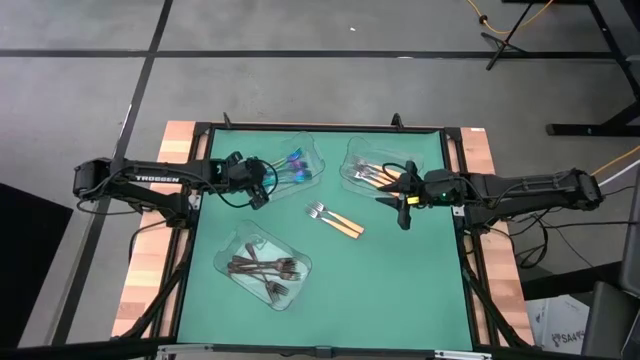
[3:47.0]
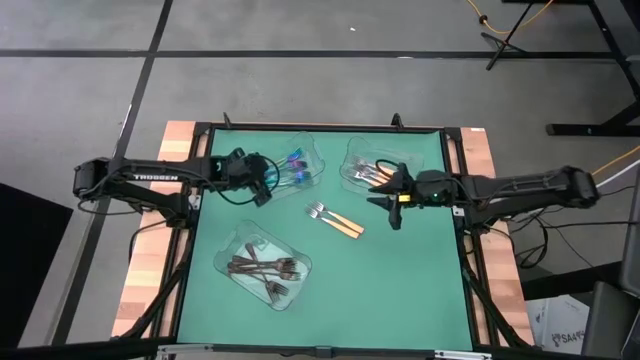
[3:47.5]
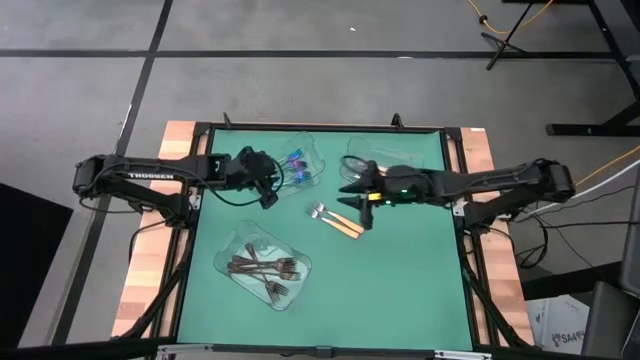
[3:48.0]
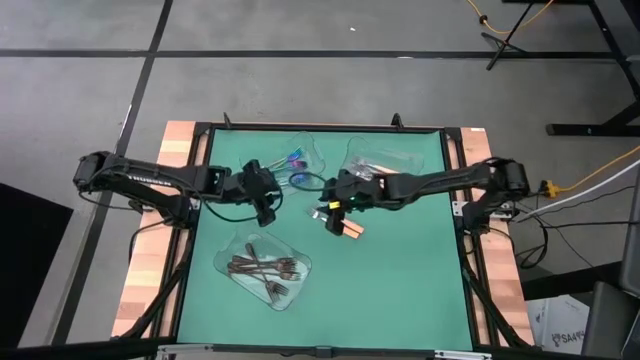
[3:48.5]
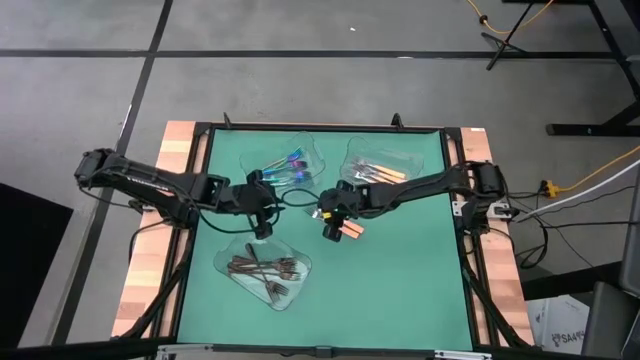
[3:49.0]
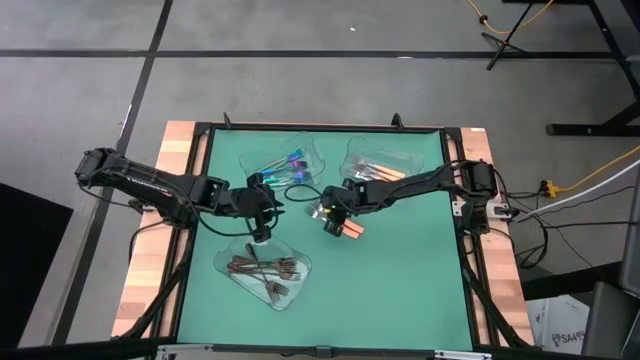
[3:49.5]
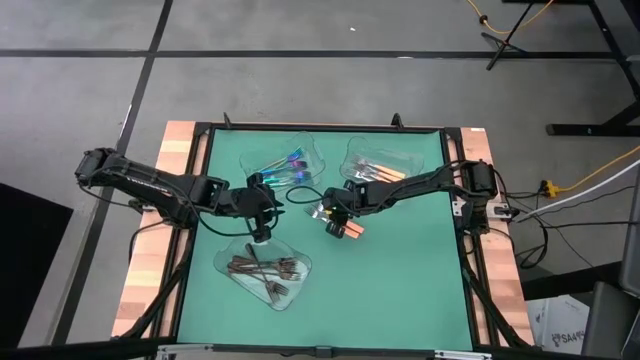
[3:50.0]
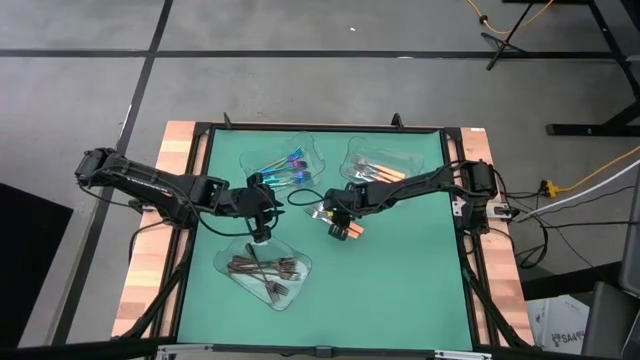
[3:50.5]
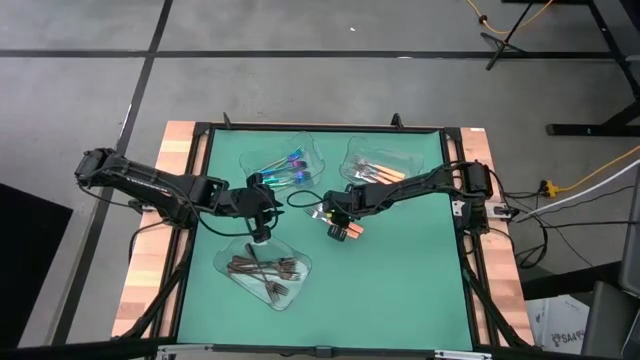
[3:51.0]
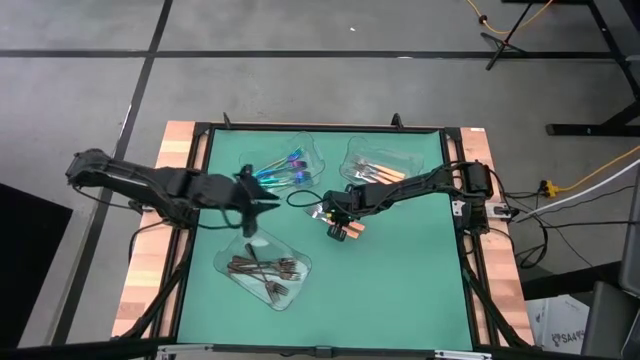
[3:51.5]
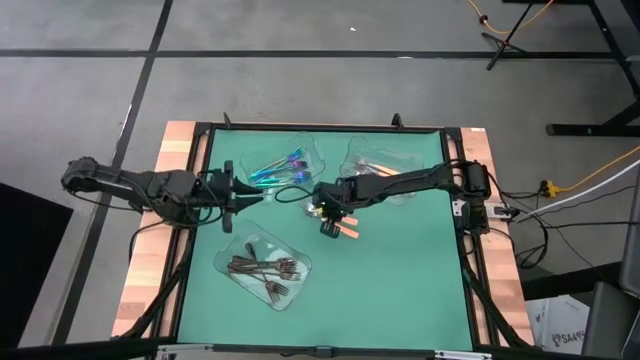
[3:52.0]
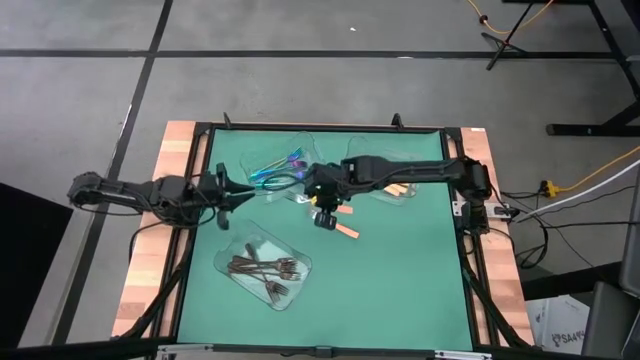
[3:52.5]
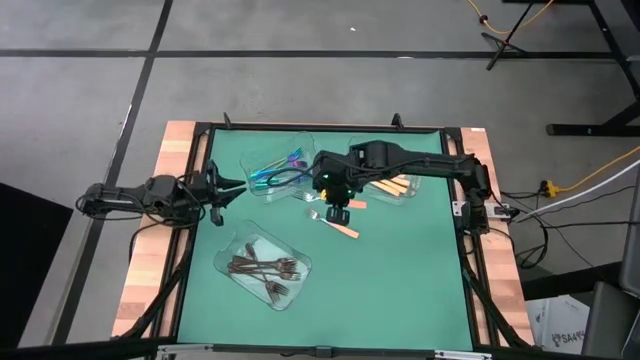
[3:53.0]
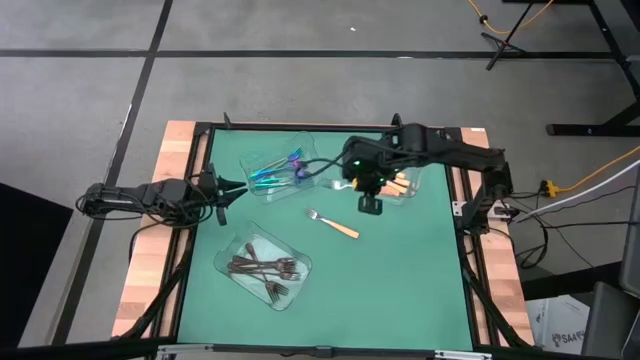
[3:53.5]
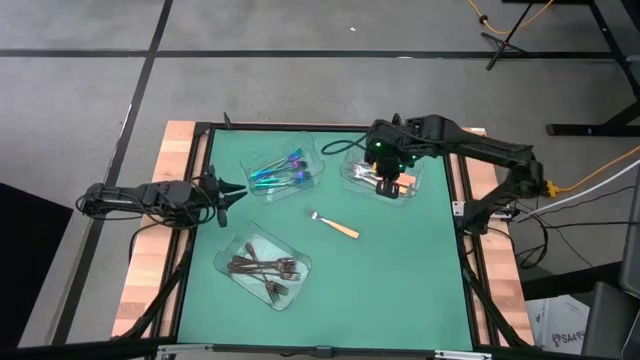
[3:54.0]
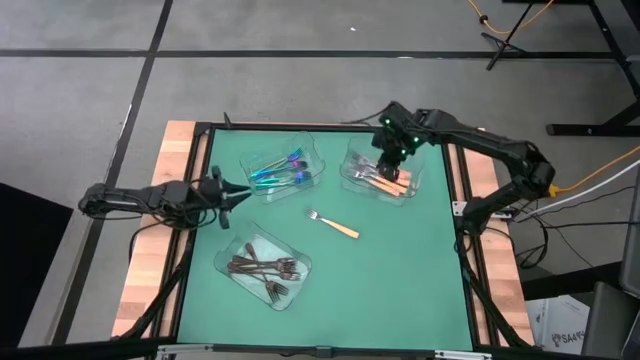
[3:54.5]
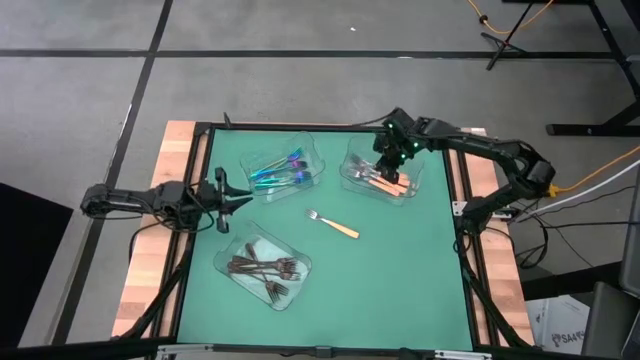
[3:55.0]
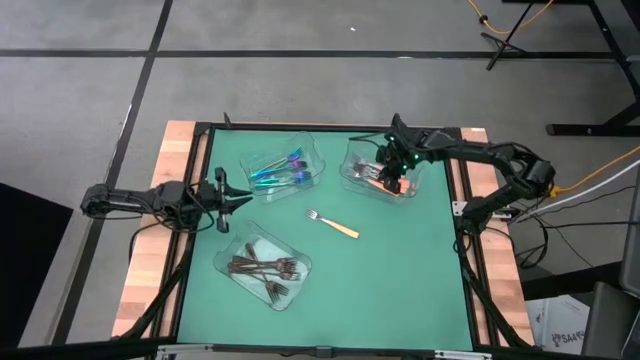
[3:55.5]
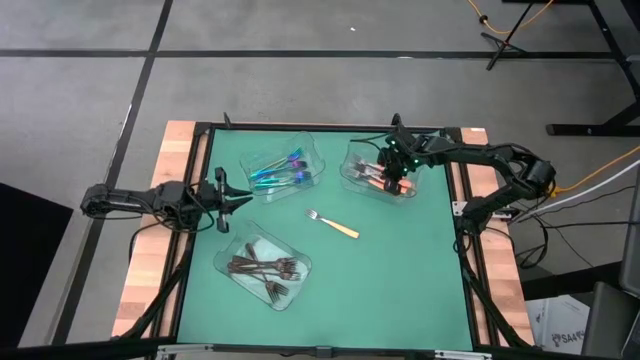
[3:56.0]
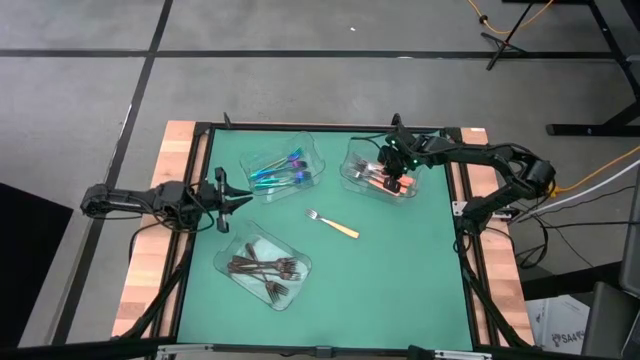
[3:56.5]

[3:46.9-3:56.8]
Task: Sort silverware by color (type)
Put the yellow fork into the top right transparent bin

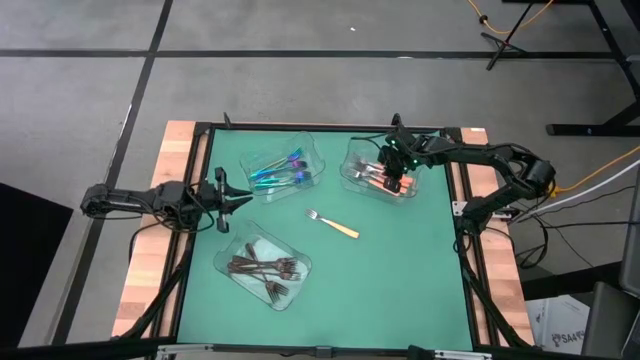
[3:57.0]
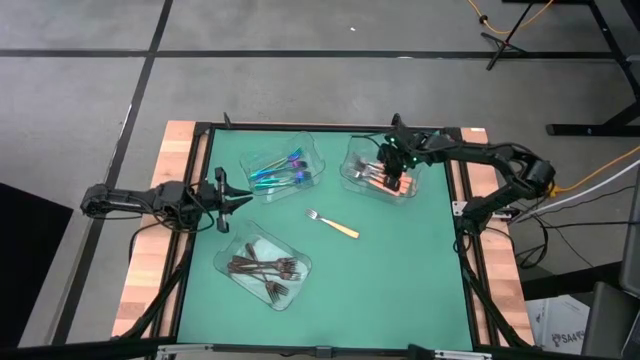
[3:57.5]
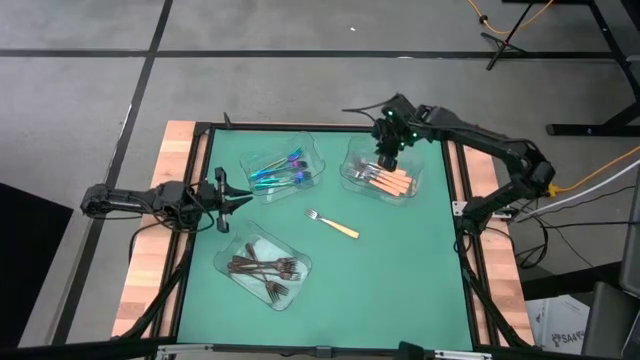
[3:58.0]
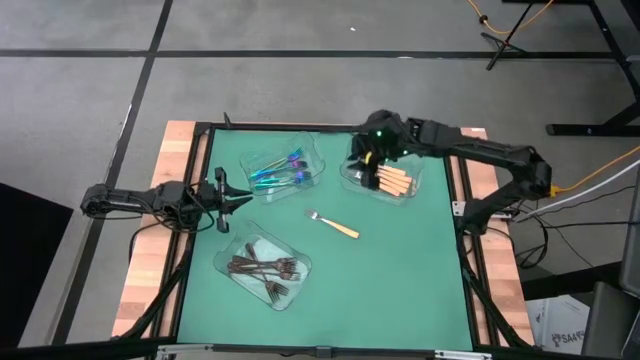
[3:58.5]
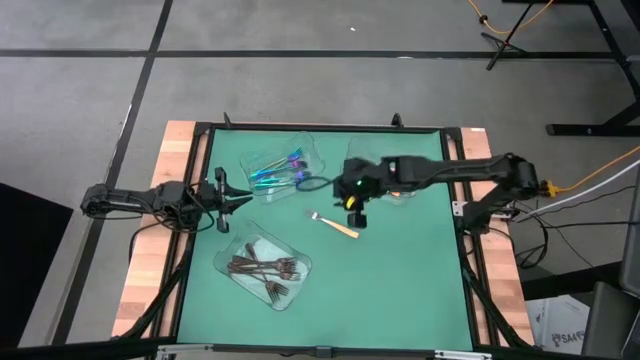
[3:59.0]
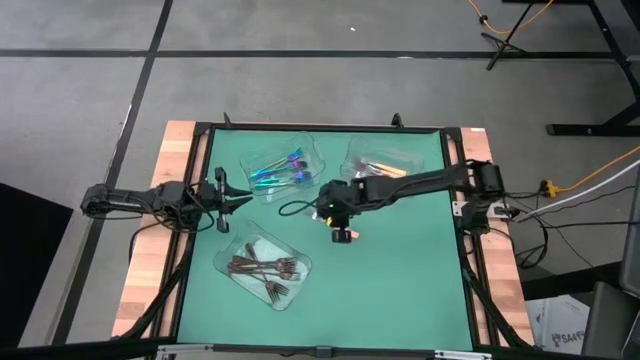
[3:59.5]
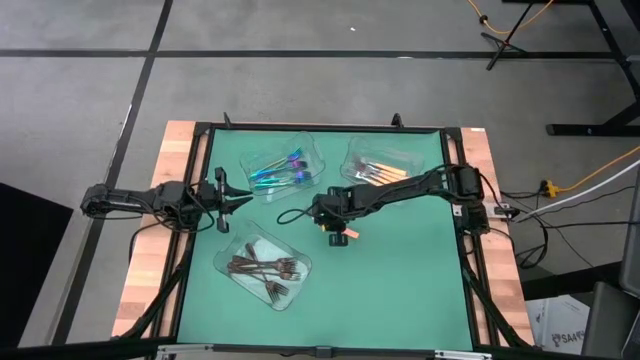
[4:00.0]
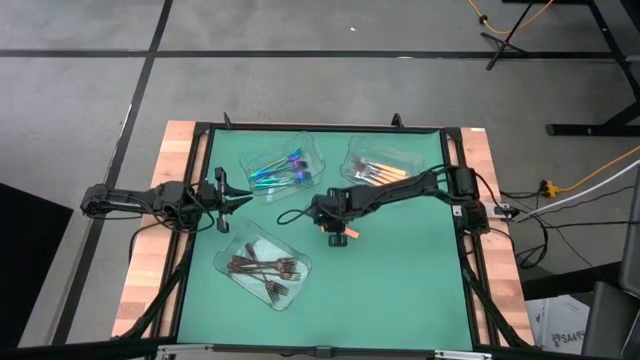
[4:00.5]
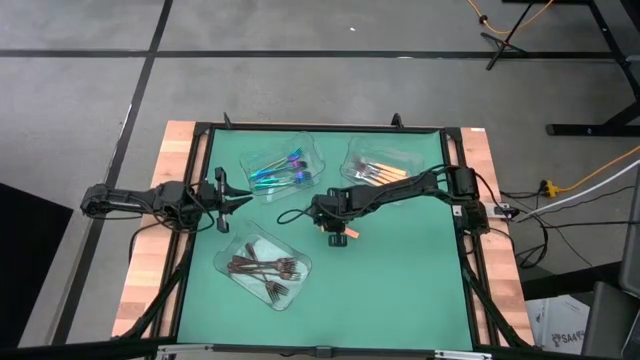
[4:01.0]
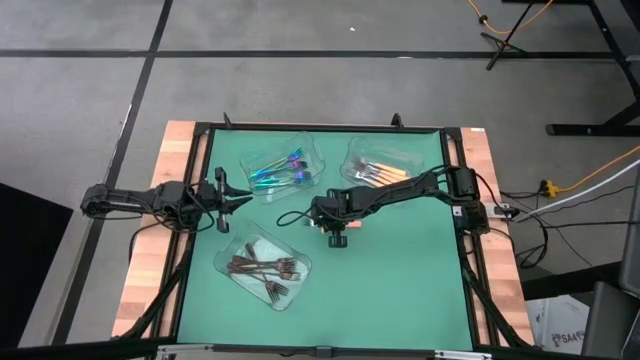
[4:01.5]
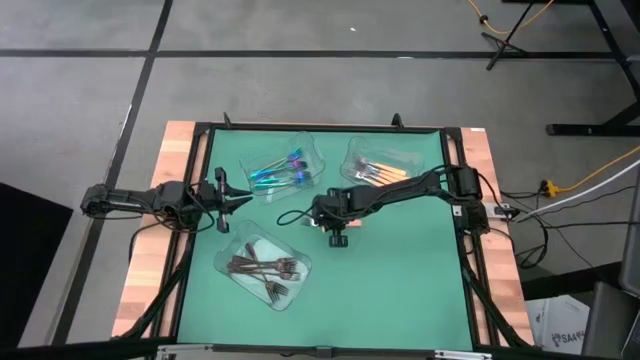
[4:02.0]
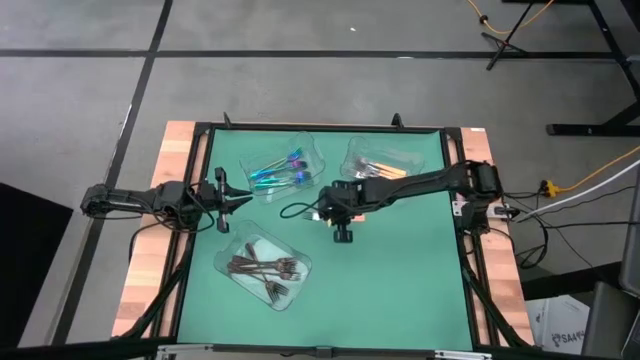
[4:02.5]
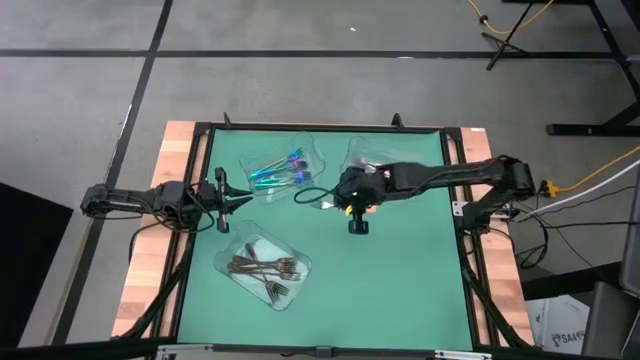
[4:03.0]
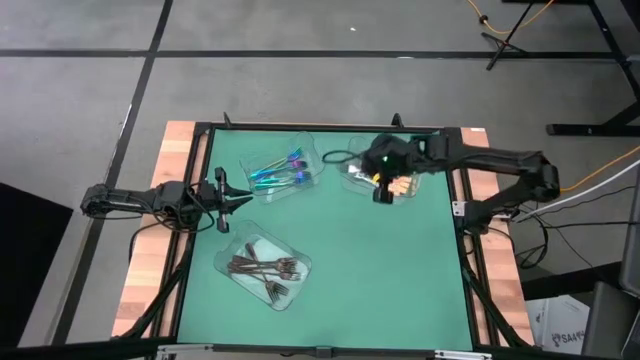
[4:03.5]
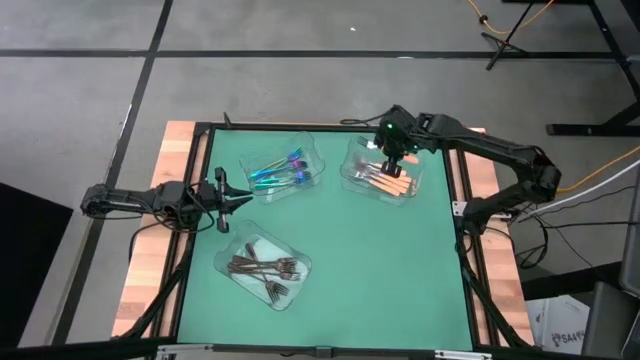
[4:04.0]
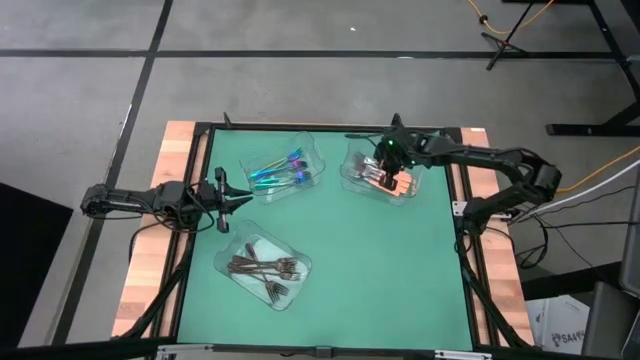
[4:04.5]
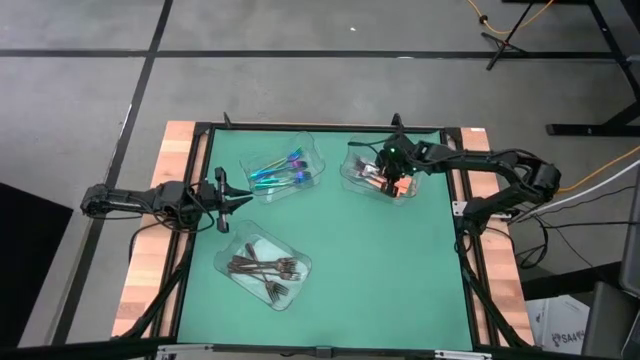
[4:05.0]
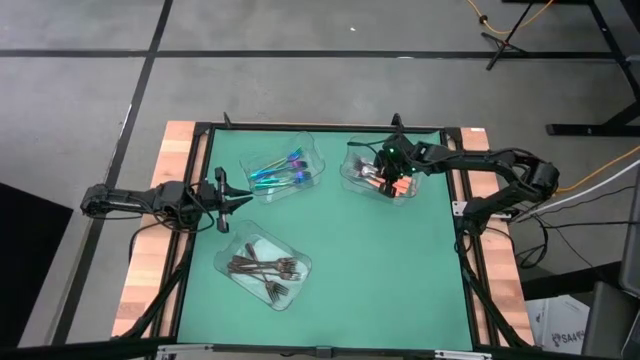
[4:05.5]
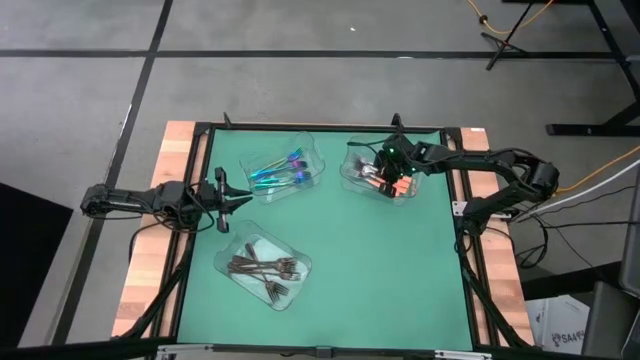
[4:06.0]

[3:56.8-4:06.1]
Put the yellow fork into the top right transparent bin
